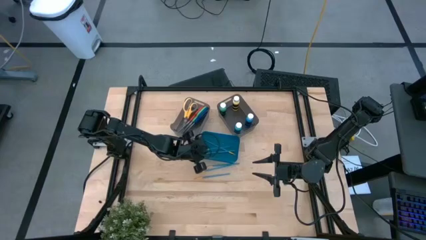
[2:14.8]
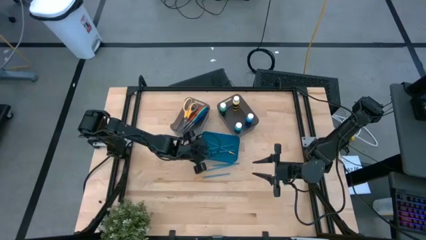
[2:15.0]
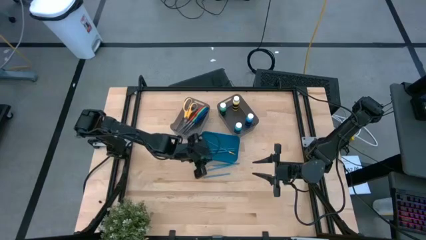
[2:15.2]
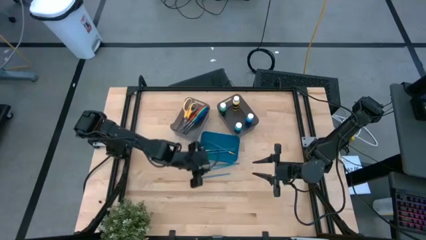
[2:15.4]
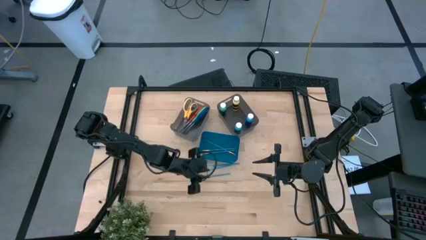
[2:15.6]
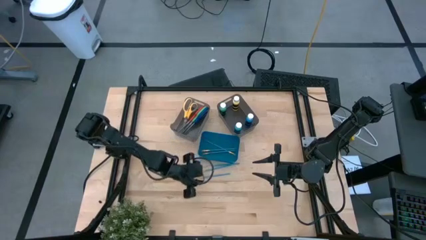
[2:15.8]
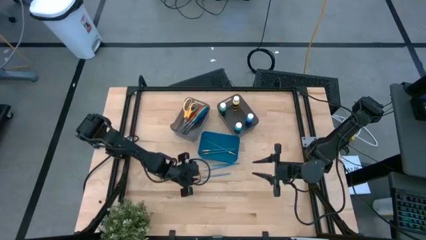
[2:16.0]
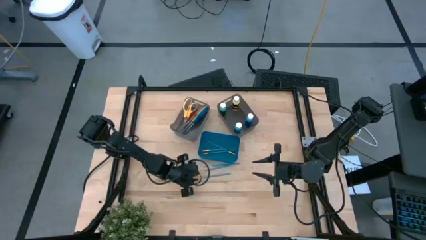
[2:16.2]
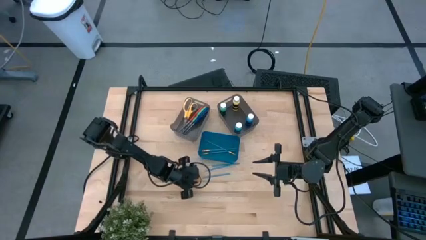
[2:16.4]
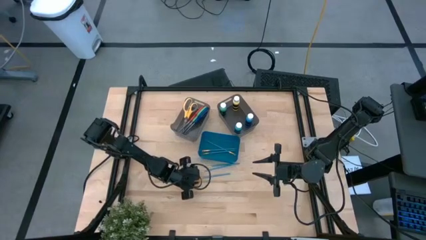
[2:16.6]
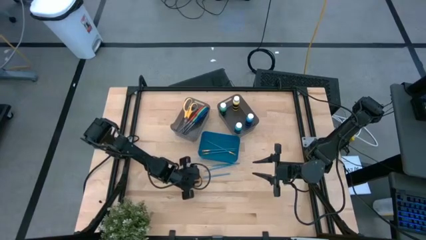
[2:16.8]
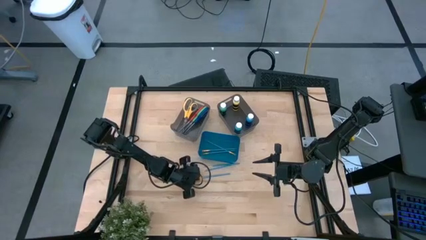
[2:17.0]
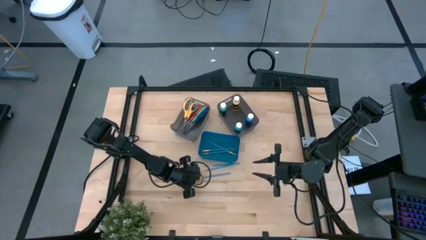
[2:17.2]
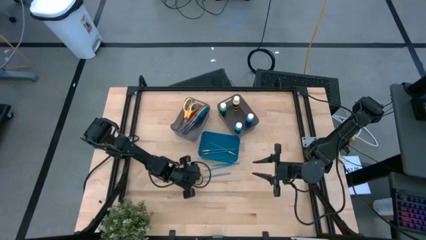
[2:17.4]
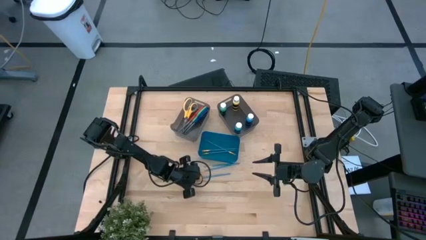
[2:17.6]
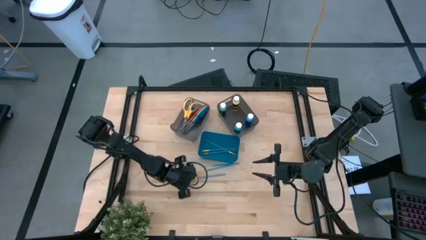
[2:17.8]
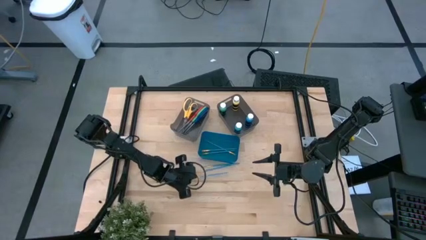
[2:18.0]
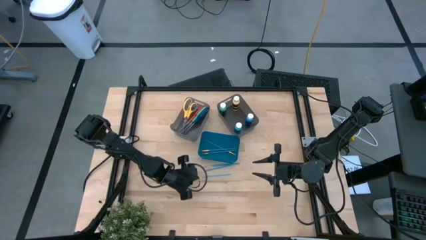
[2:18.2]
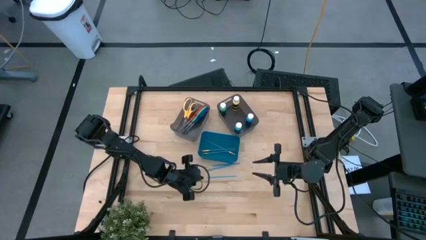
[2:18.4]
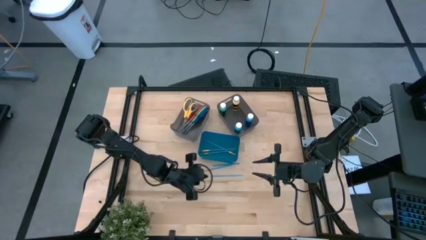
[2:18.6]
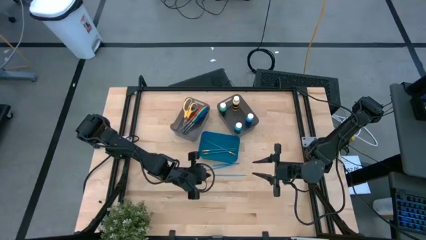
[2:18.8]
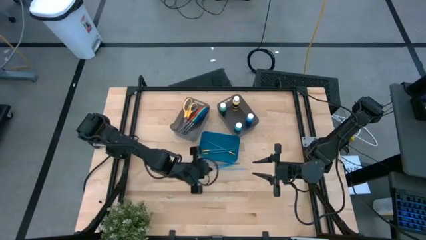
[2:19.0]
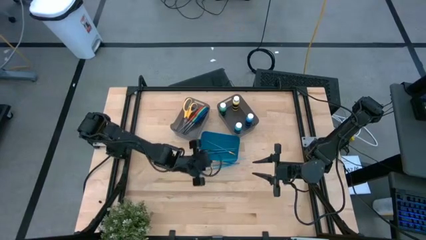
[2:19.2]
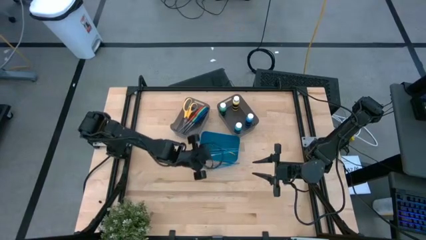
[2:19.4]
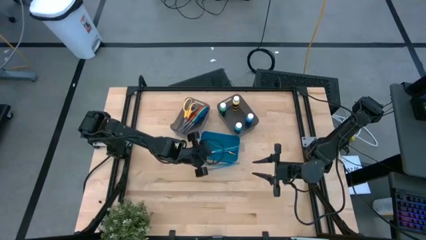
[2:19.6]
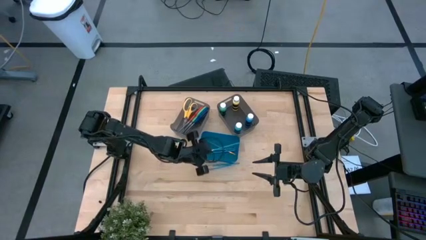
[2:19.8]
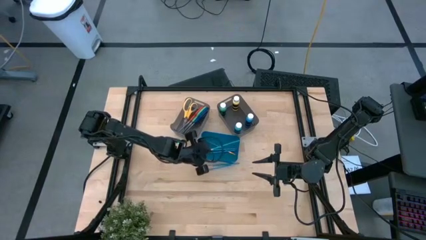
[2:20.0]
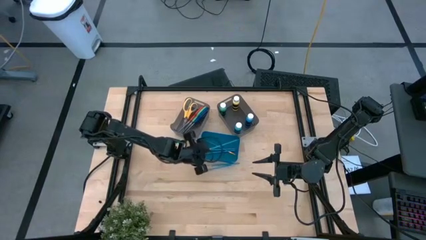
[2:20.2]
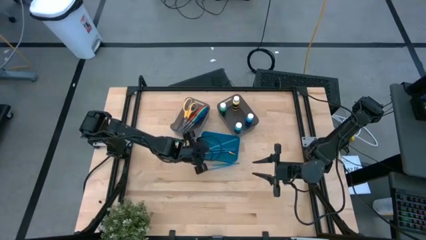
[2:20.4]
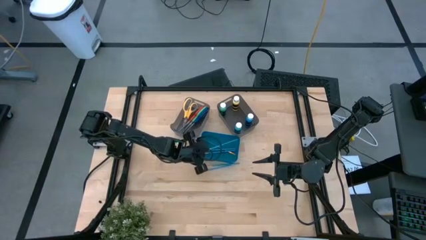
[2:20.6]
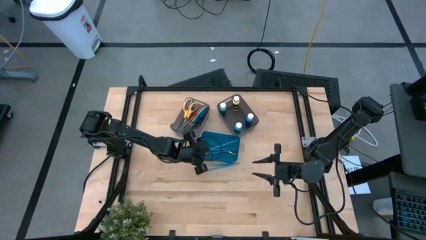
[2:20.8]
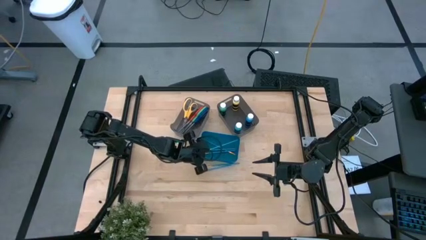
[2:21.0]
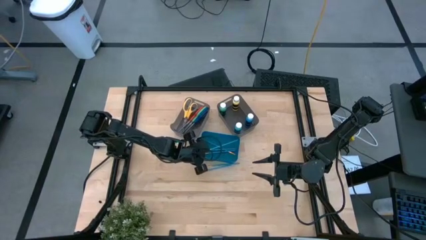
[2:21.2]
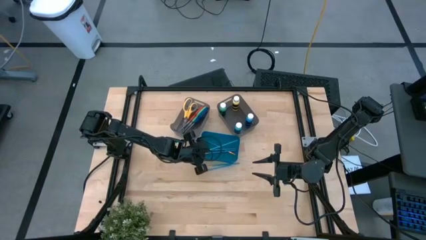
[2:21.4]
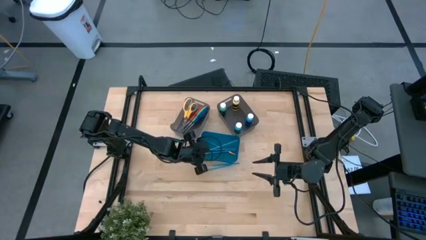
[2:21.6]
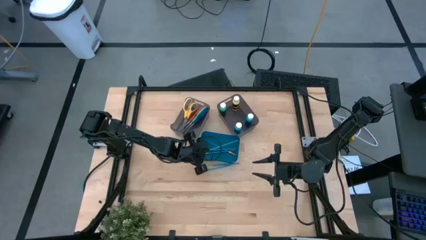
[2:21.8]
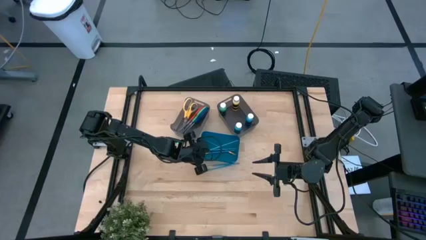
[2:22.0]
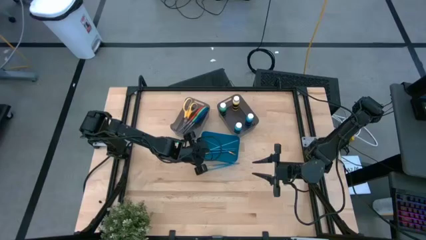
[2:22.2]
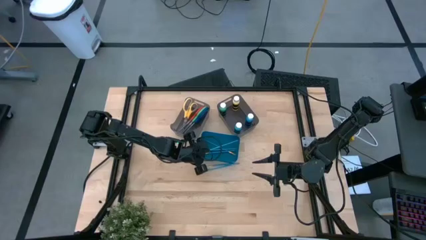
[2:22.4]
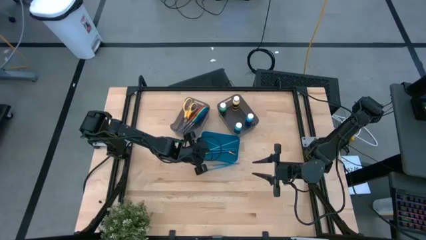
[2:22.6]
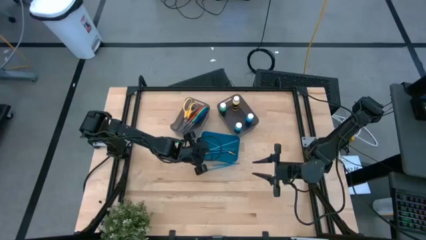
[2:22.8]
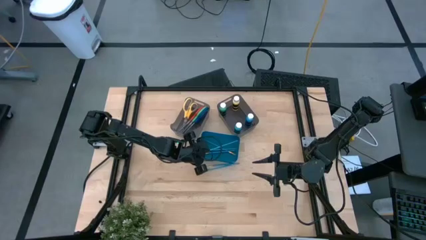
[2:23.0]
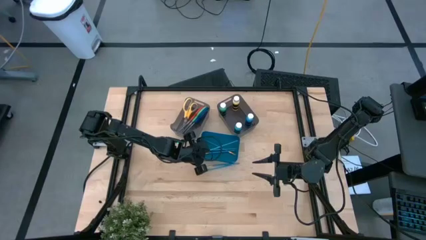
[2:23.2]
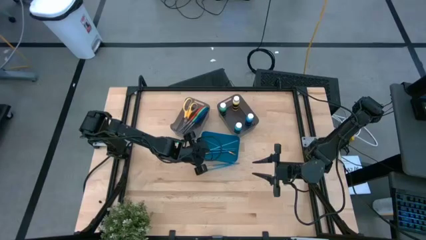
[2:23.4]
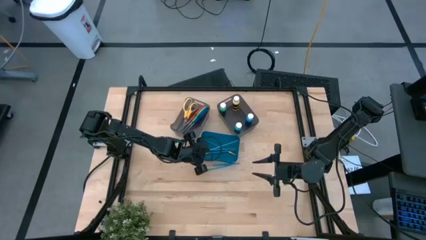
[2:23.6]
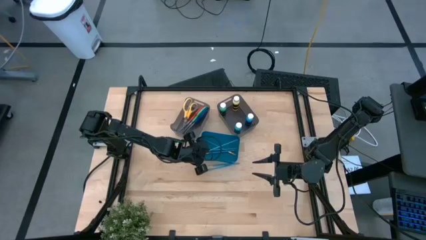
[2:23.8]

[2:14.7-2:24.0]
Task: Pick & Place Paint Supplies
Put the blue paint brush into the blue bin

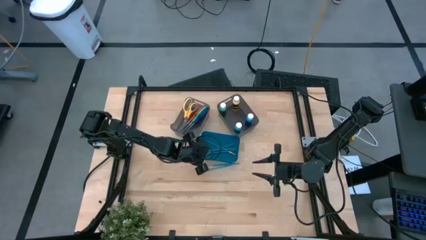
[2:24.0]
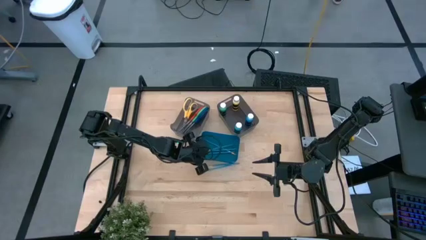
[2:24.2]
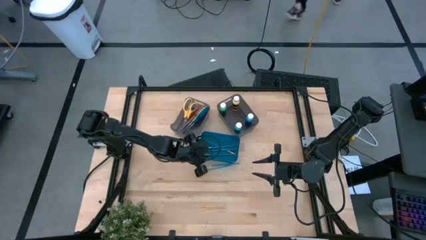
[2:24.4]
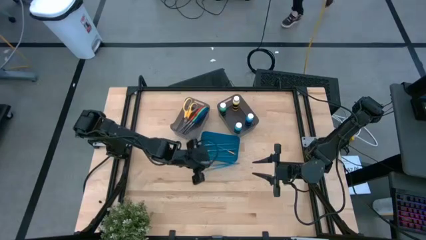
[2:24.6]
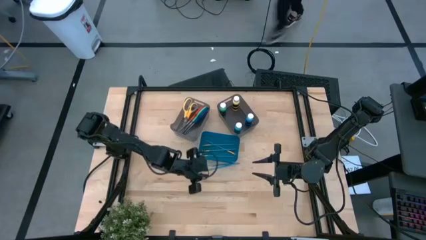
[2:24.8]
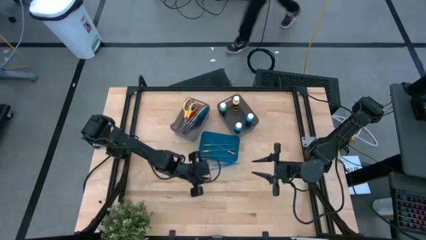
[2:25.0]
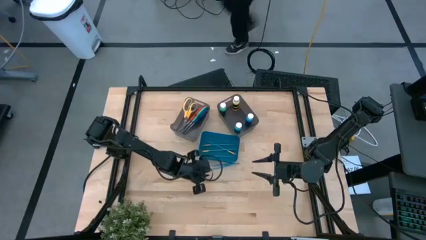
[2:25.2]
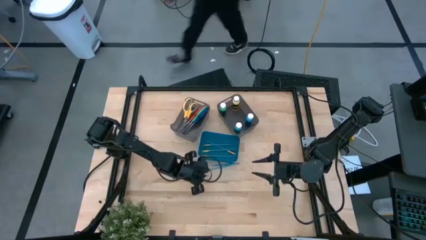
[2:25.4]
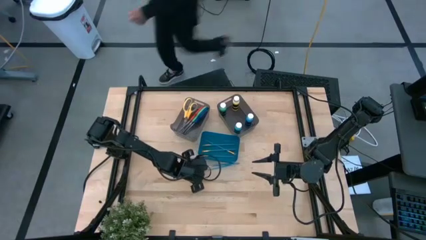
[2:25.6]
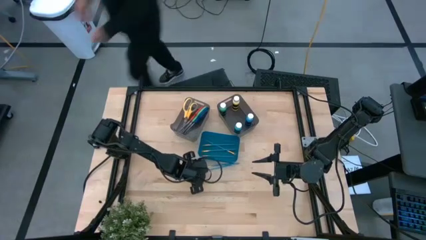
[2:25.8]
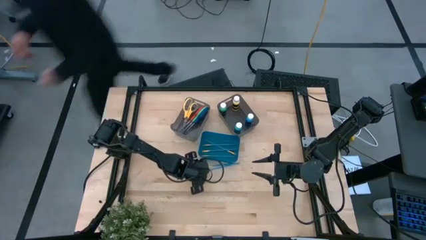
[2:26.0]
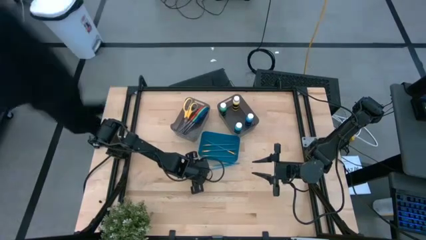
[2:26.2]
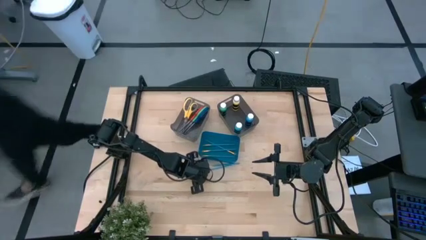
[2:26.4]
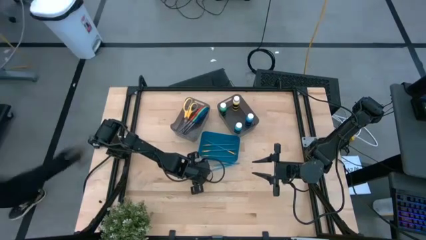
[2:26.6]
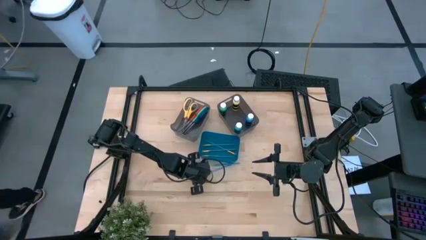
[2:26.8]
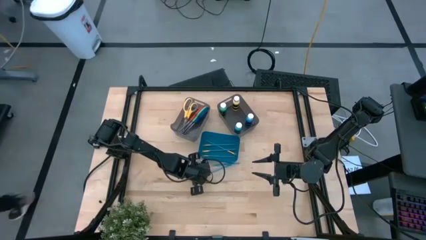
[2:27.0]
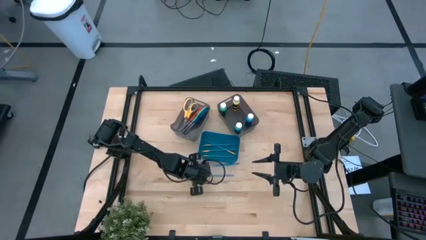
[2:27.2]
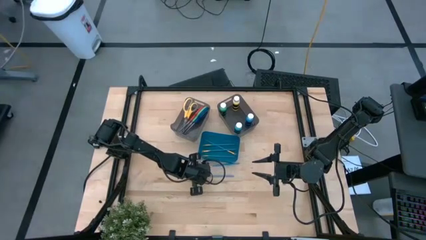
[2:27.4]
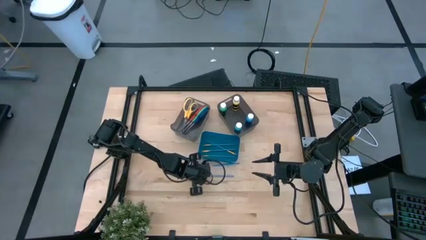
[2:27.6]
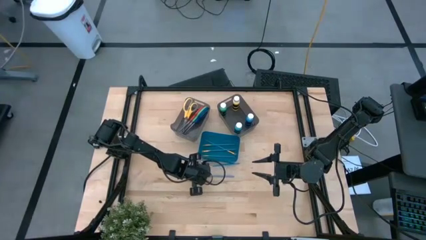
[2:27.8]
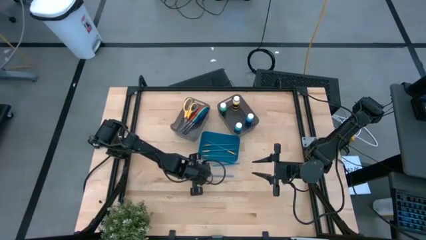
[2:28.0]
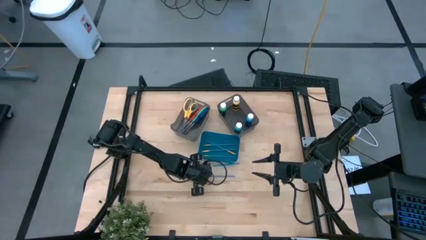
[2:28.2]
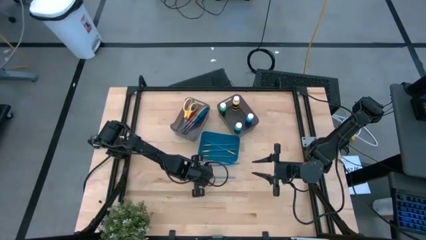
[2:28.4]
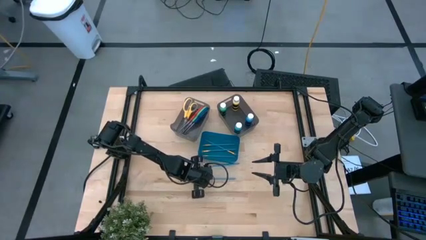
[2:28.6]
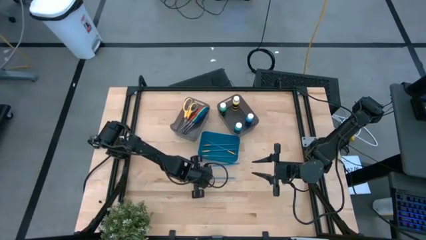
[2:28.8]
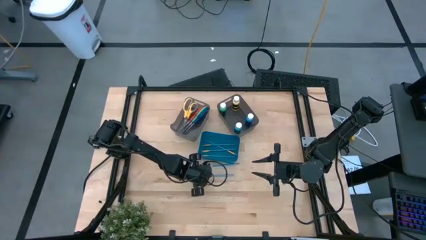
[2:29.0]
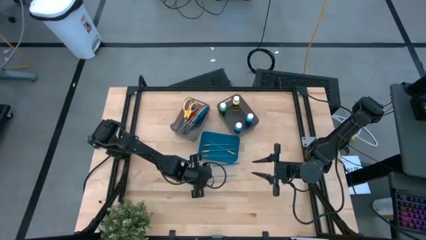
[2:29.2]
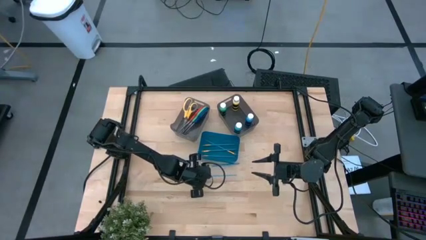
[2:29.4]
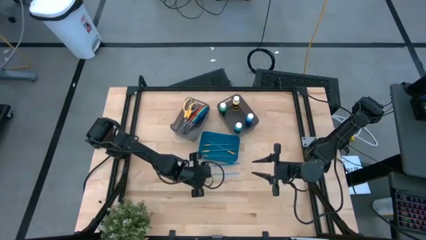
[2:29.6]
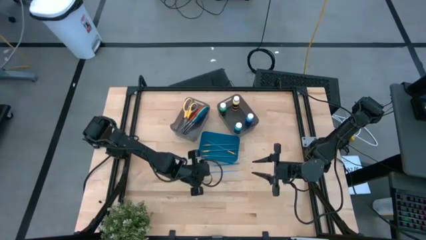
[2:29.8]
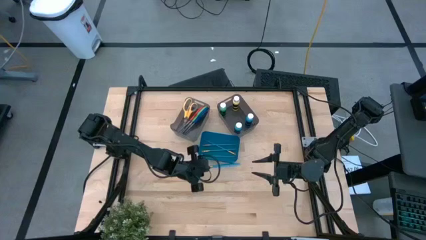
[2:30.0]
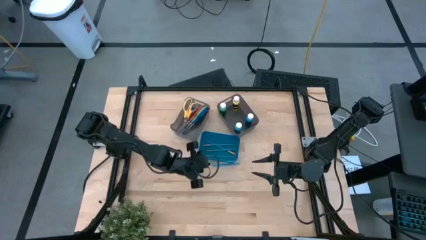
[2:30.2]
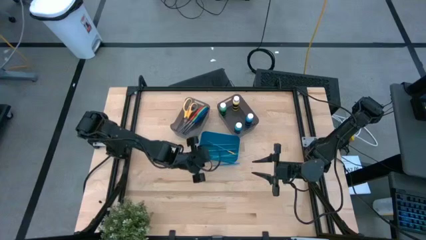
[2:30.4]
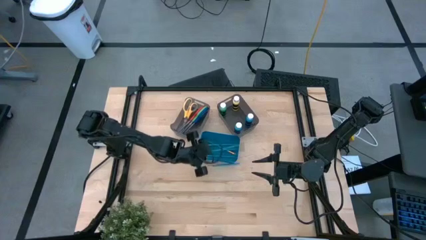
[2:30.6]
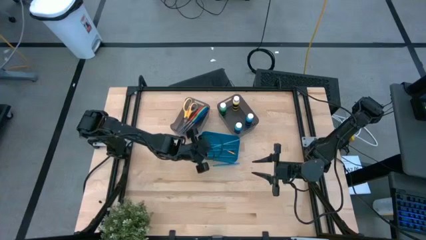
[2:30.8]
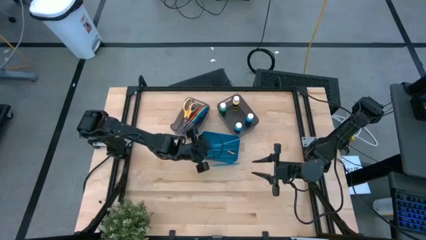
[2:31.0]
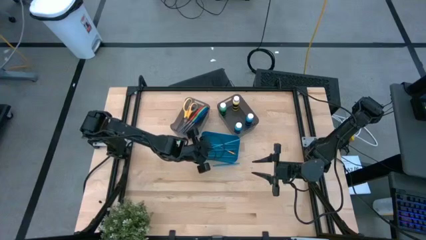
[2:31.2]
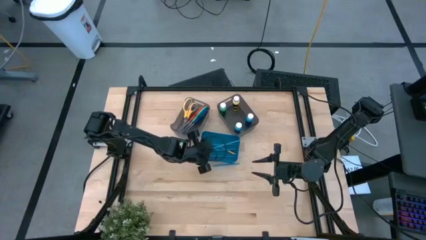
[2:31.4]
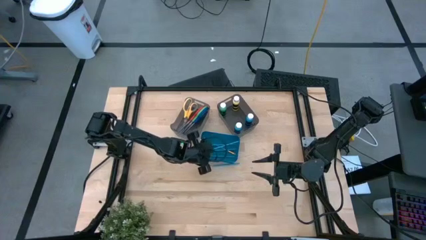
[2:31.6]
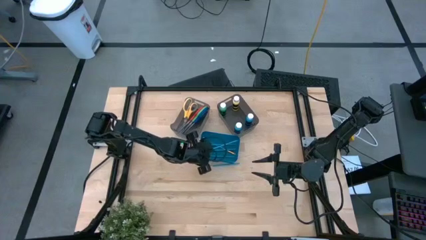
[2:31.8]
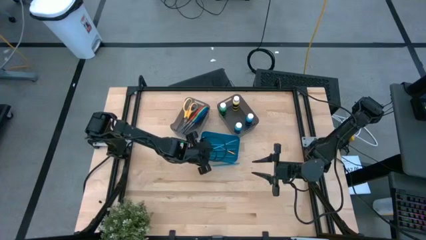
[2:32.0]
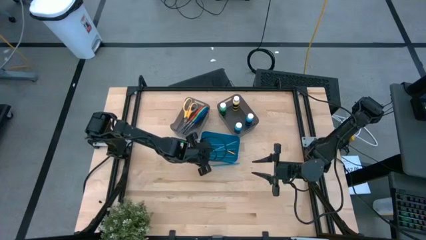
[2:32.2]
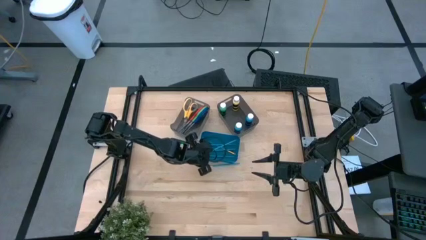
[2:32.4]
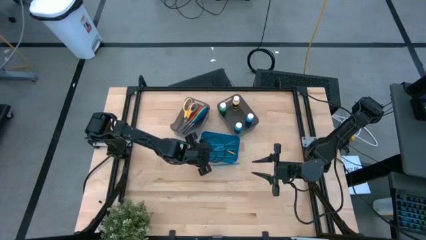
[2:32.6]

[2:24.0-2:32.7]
Put the blue paint brush into the blue bin
